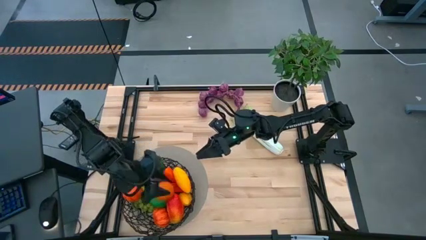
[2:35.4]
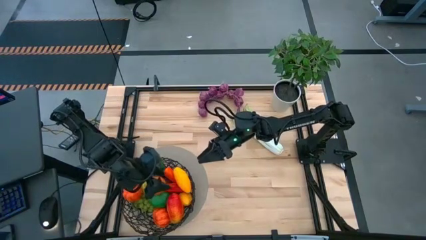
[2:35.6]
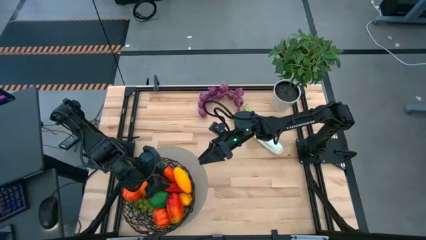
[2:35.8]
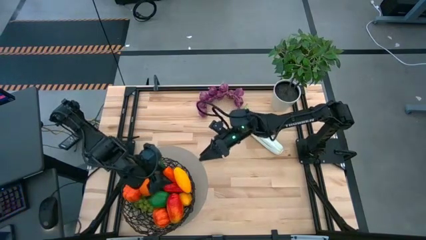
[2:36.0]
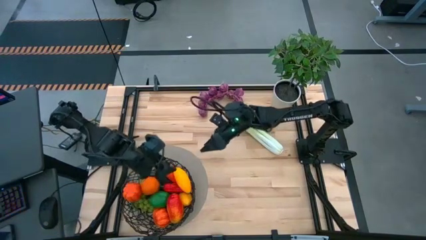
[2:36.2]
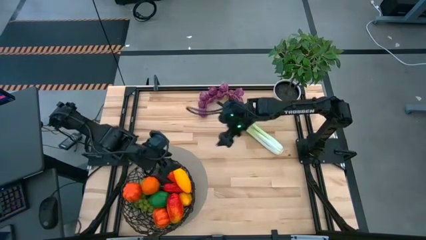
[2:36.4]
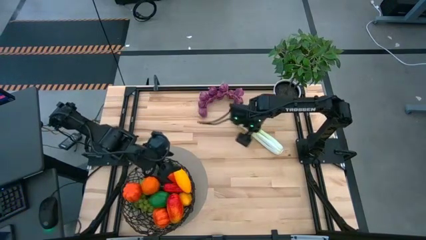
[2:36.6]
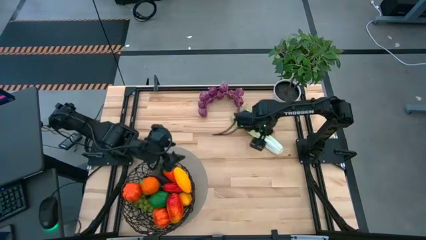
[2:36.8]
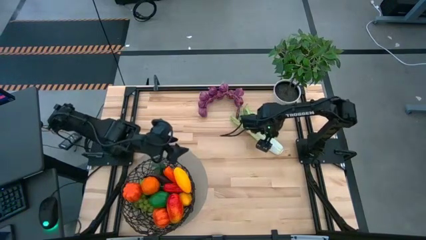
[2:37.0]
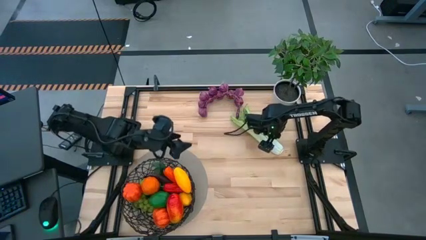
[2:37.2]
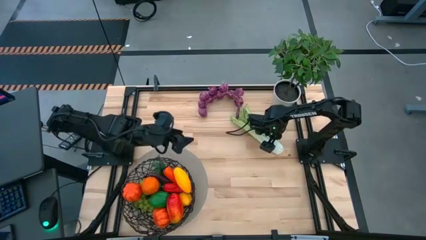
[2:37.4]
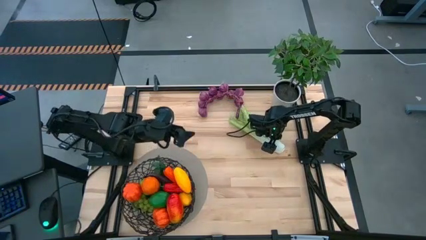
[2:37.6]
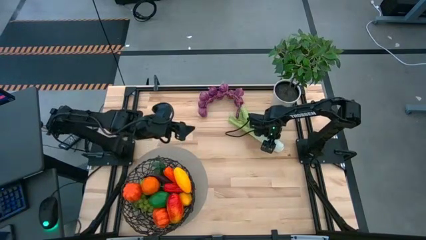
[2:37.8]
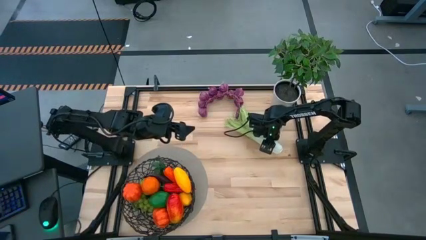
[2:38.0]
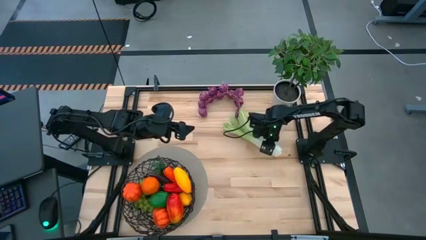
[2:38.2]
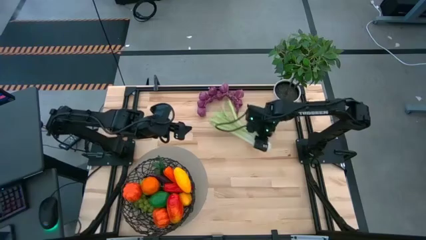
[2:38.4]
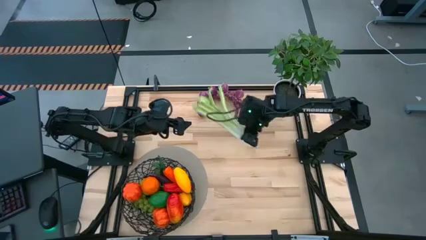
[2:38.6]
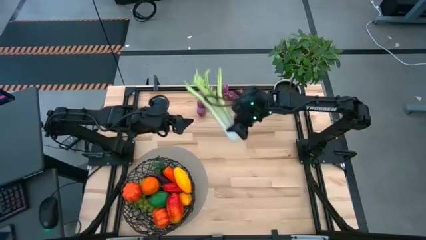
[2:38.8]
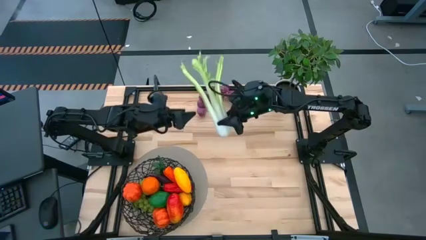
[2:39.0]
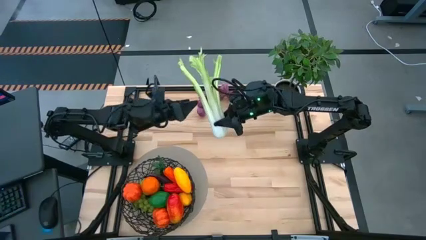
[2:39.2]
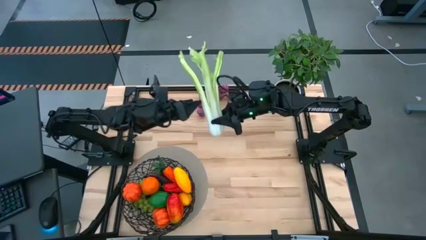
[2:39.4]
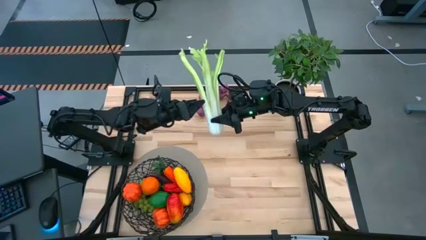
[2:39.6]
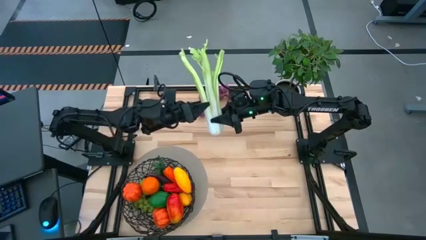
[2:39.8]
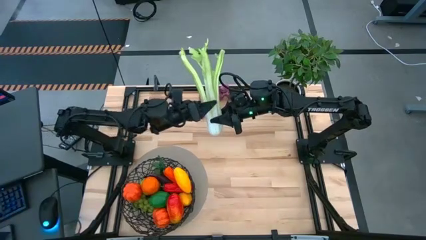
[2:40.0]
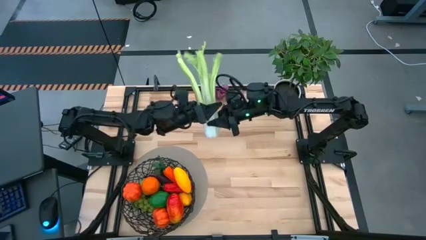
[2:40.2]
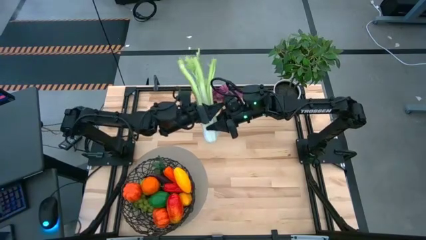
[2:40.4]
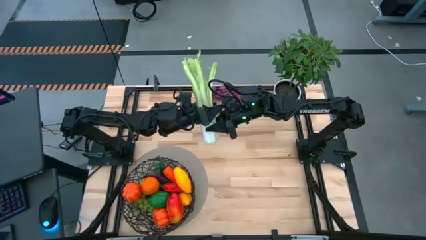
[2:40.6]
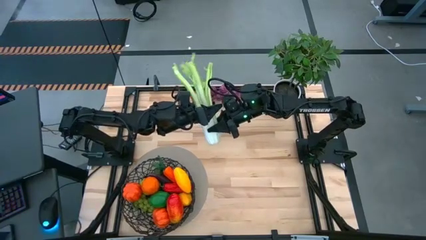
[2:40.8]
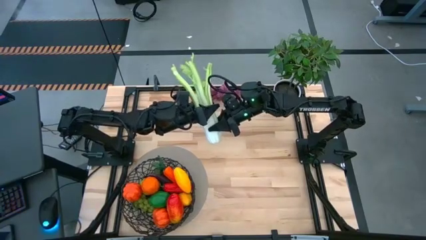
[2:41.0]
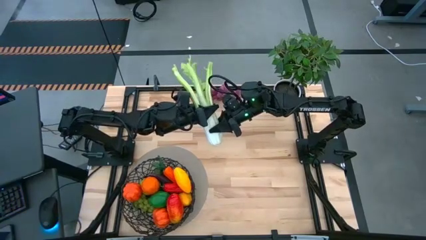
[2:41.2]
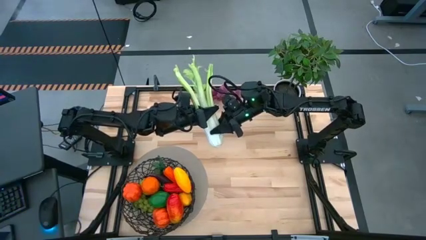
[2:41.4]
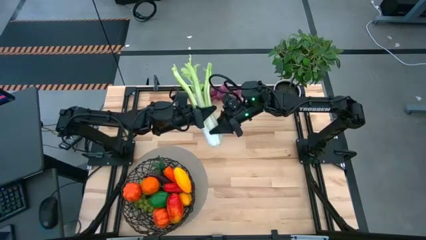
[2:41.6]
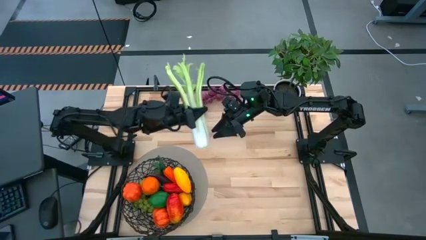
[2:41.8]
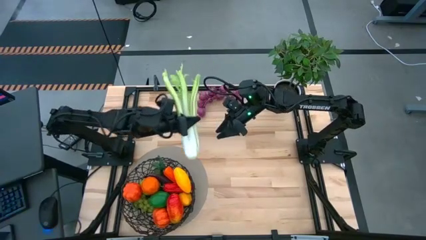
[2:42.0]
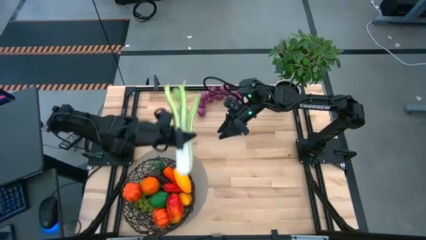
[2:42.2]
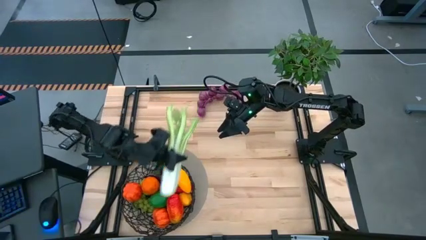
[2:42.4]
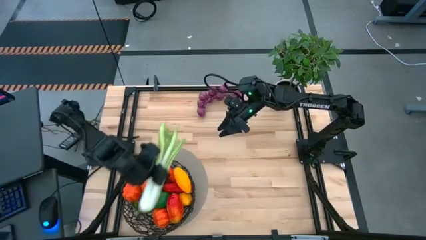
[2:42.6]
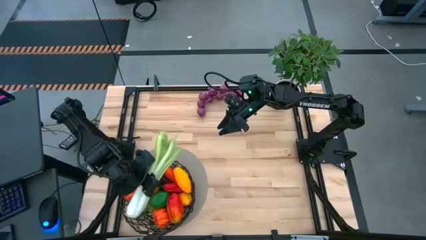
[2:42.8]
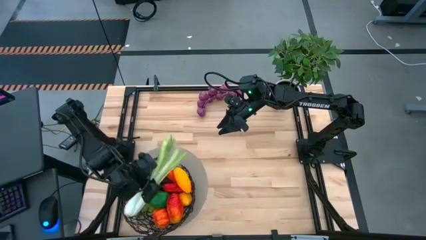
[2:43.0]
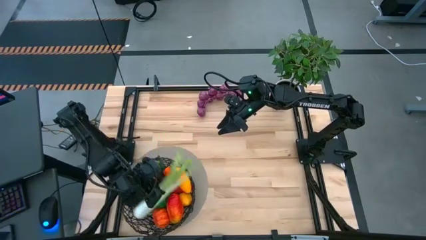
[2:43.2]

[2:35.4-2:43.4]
Task: Build produce basket
Put the green celery into the black basket

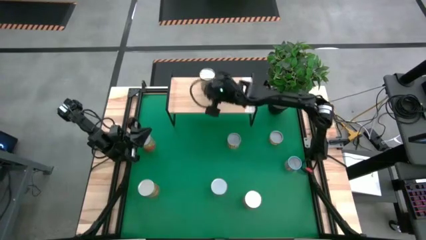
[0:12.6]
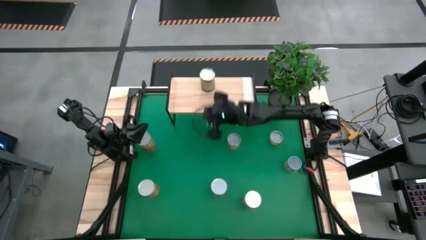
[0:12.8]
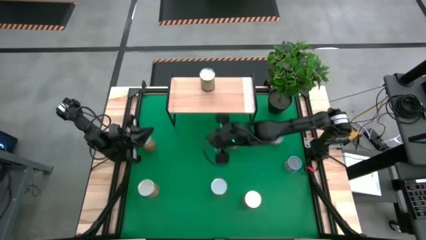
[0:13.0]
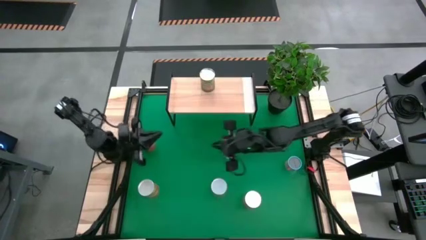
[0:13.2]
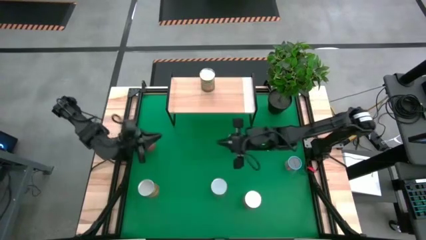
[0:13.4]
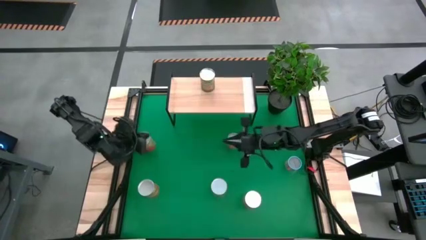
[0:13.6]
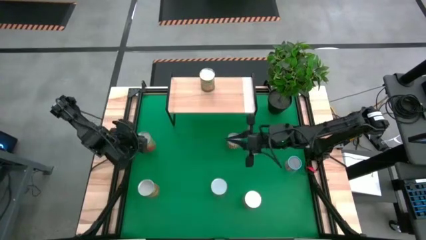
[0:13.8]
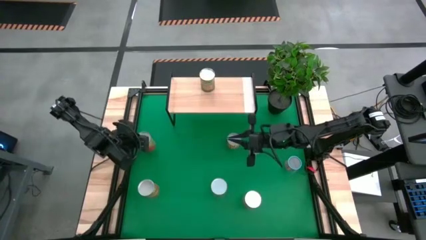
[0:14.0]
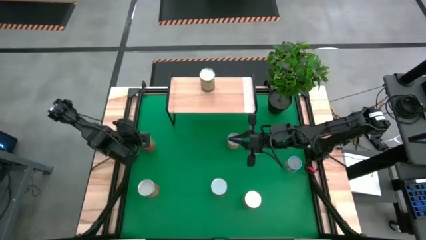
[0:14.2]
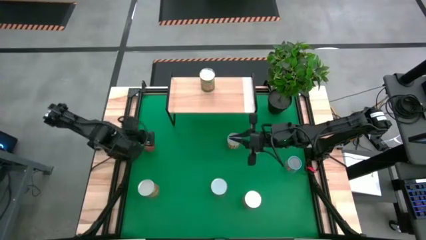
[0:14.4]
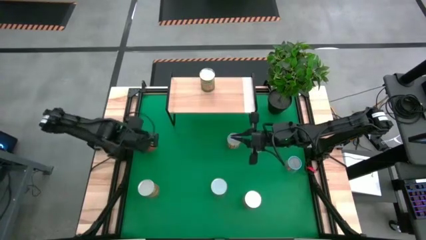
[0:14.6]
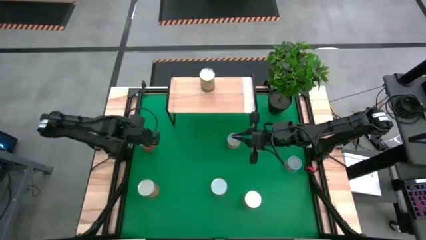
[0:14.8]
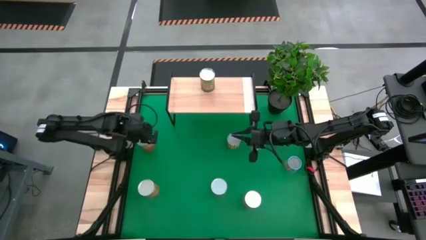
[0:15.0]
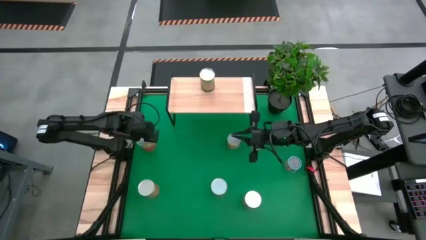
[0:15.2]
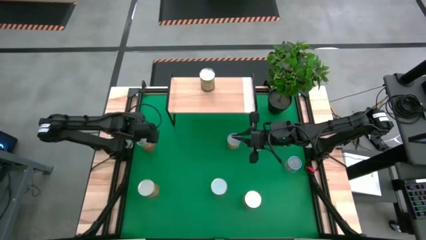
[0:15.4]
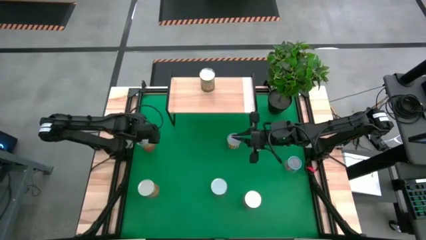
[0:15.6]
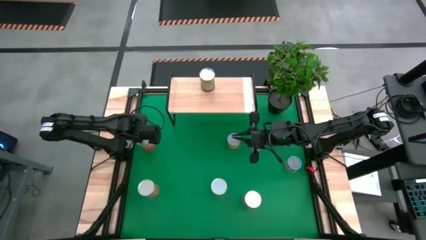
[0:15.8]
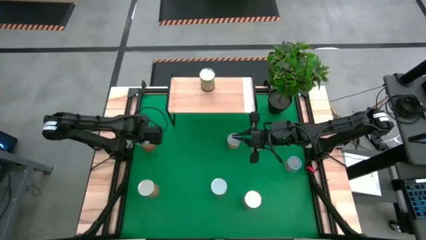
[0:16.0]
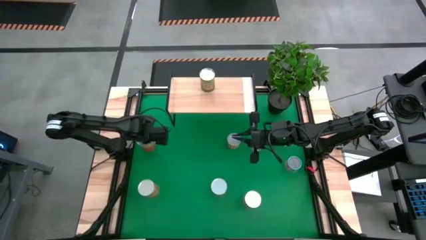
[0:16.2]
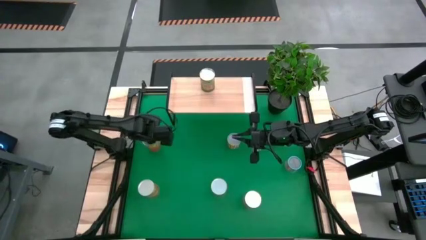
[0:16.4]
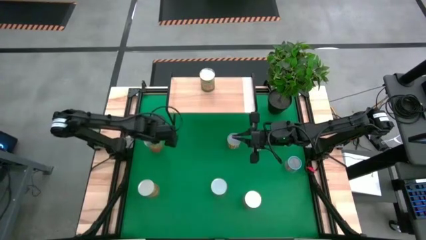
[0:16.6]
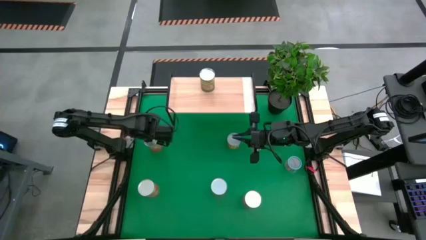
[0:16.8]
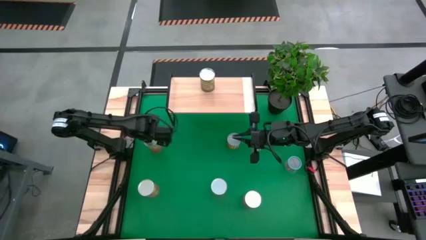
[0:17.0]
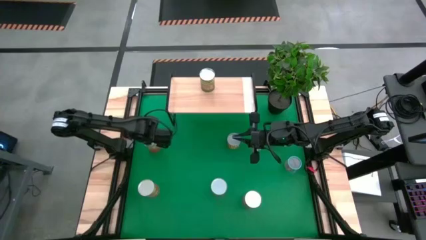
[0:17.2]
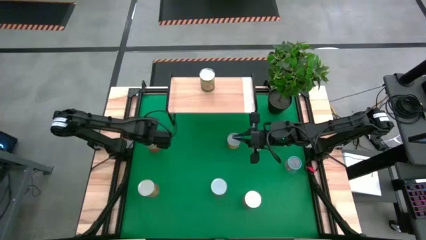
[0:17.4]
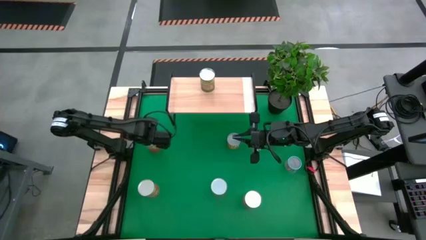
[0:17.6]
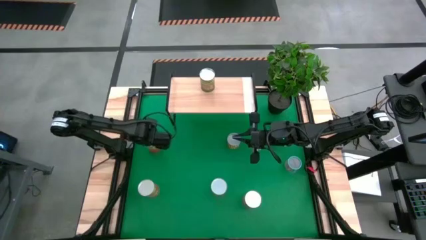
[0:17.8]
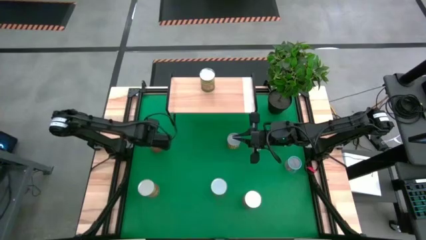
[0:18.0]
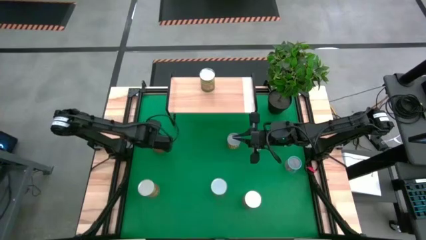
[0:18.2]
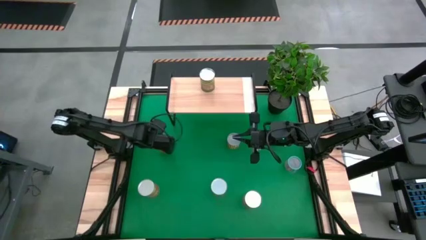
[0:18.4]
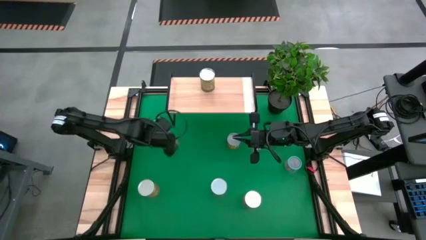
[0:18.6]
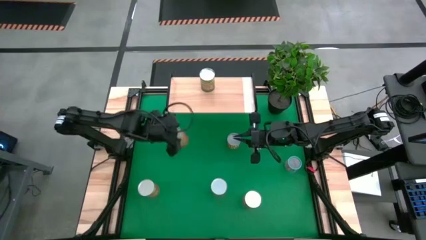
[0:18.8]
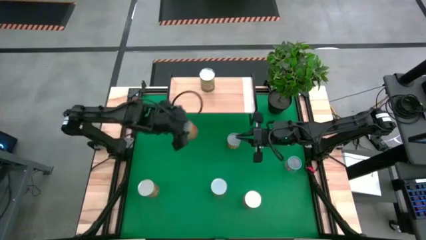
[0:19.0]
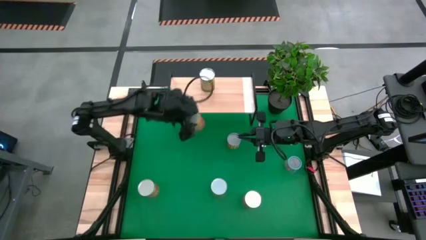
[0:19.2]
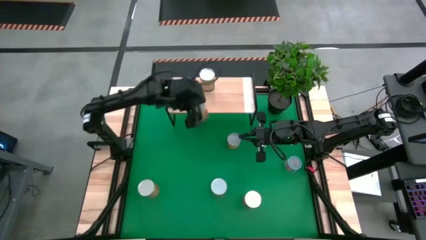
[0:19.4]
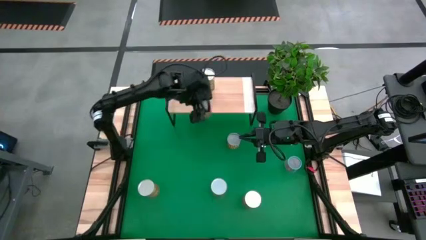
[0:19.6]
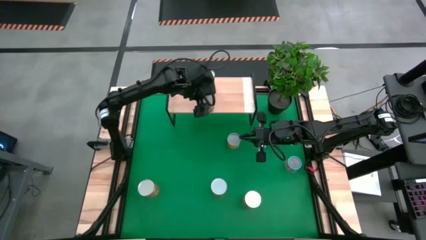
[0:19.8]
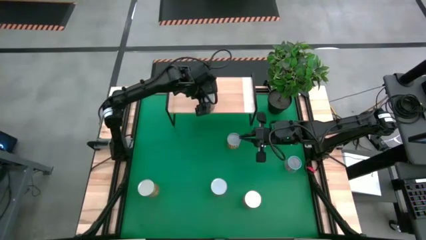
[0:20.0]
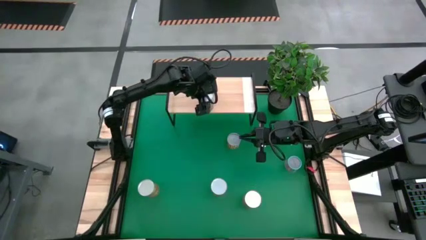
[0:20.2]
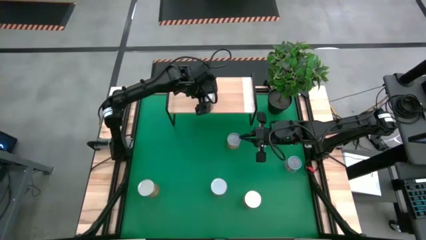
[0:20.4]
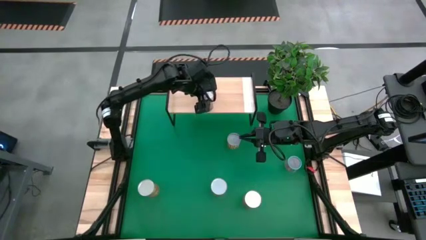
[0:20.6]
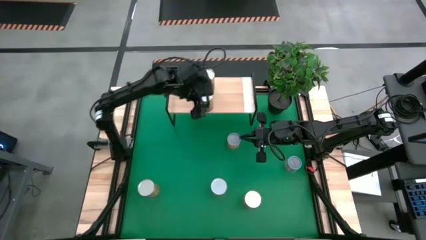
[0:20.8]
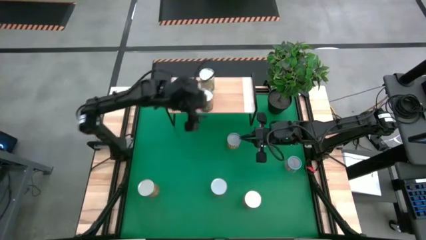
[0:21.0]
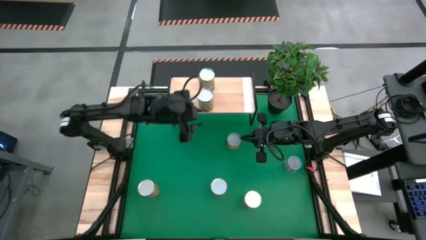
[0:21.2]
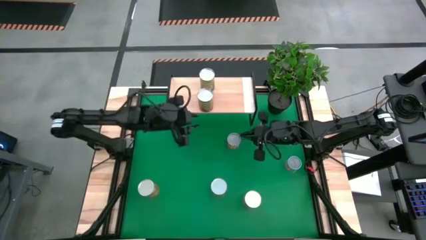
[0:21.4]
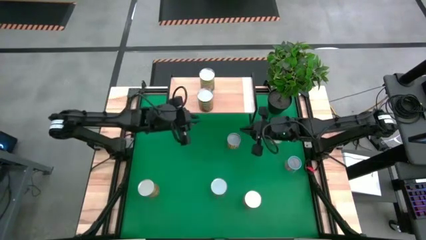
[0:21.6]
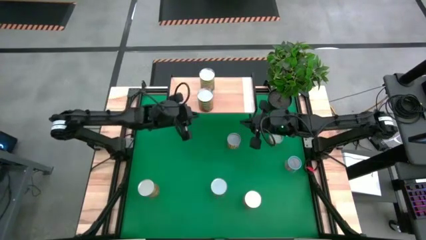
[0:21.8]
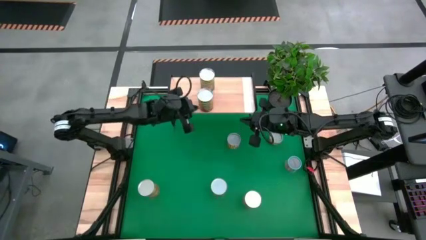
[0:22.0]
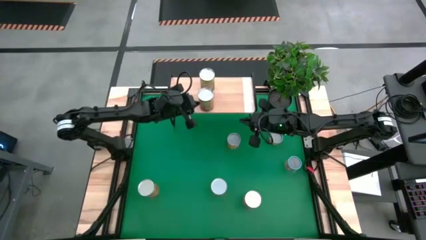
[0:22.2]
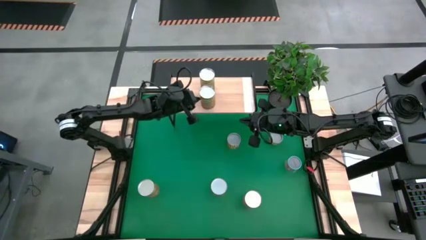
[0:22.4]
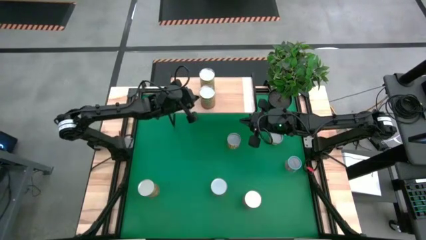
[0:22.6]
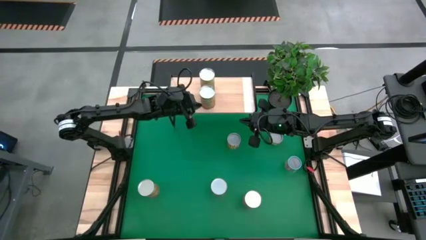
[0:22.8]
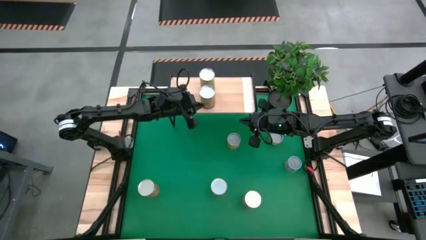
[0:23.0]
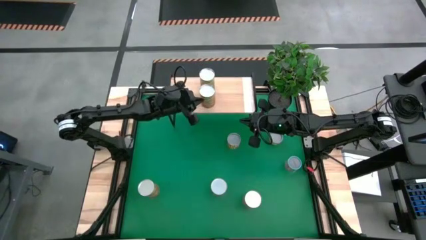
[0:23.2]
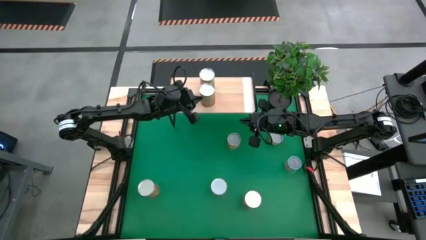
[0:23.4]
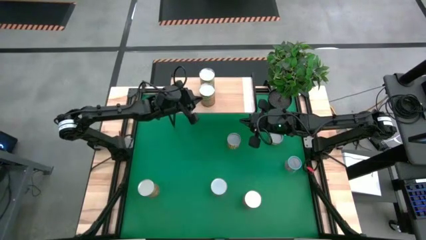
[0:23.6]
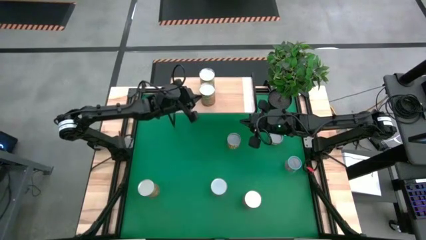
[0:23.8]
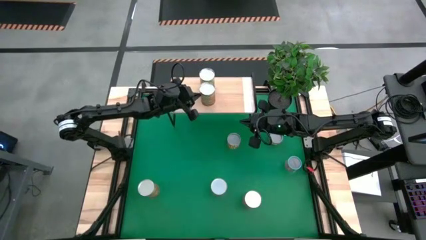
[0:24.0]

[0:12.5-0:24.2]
Task: Pick and place cans onto a shelf
Put the canned green beans on the shelf
